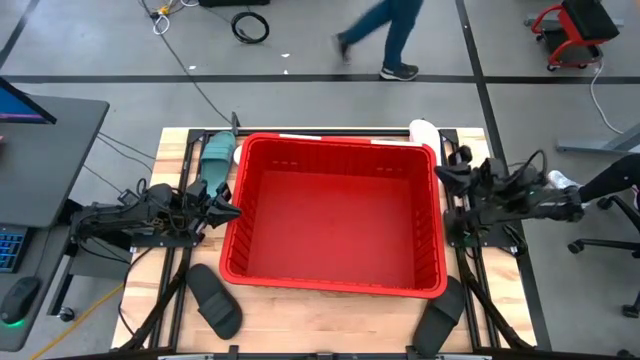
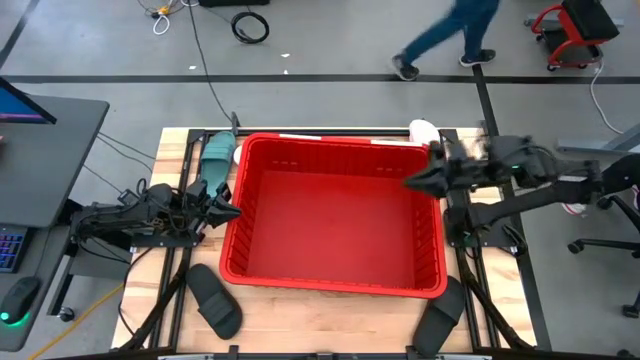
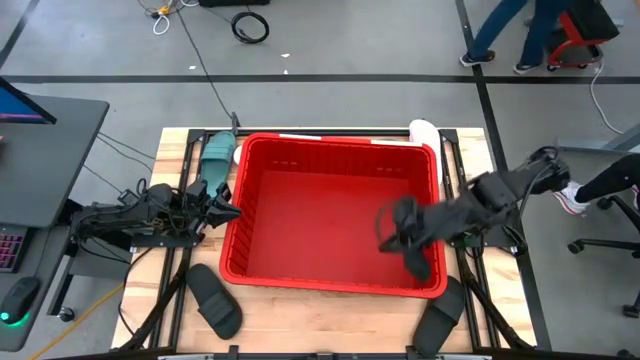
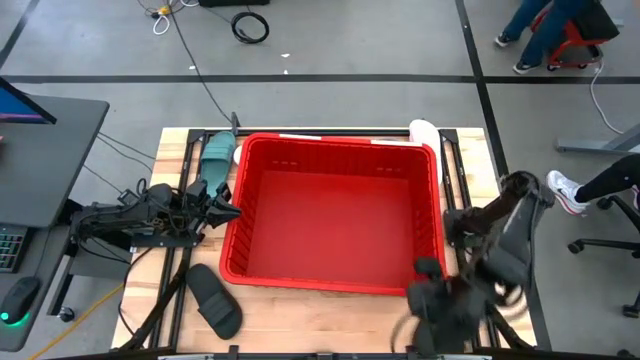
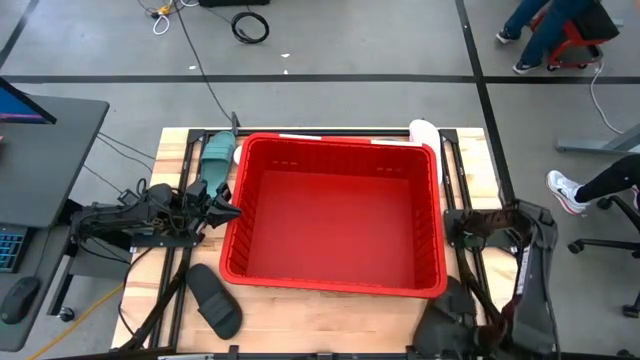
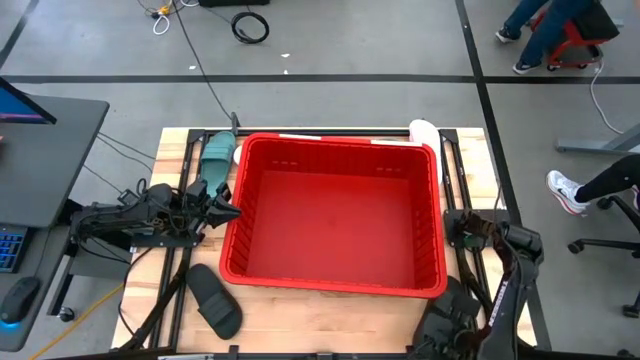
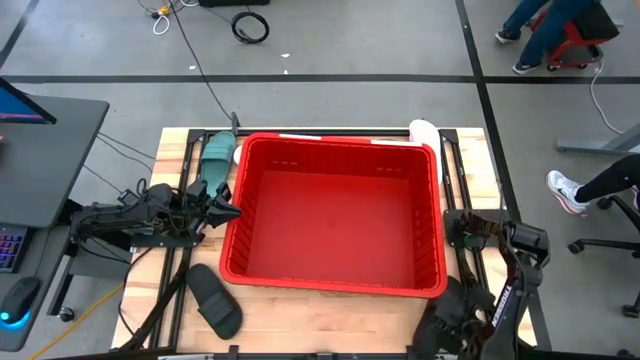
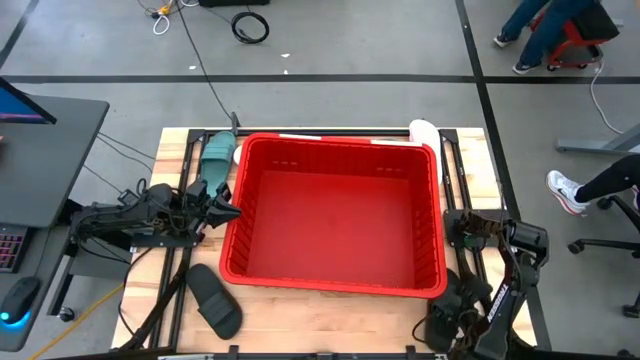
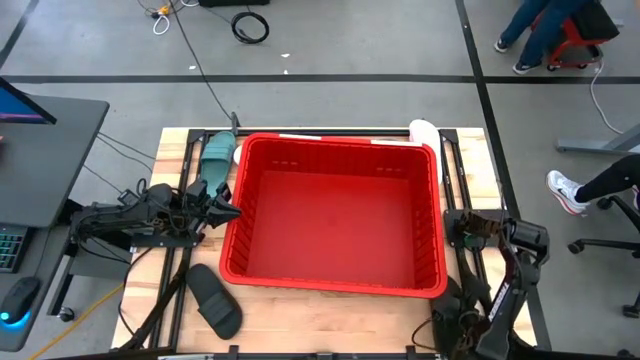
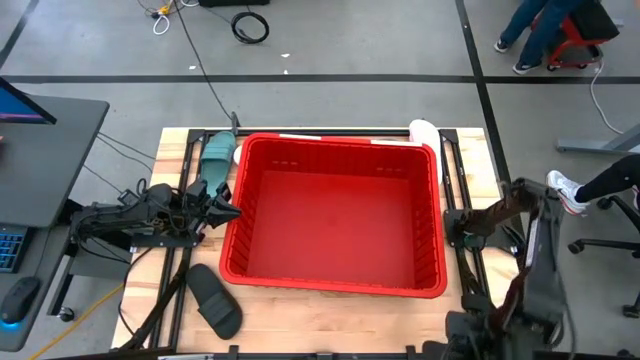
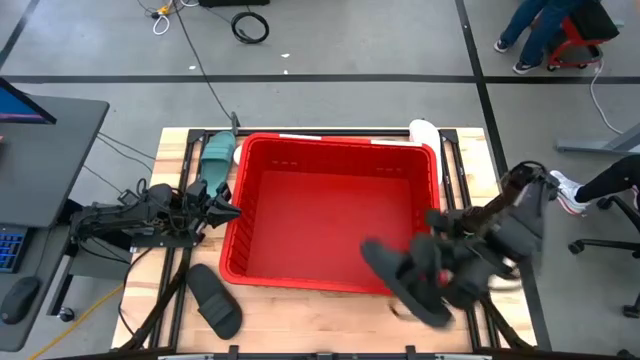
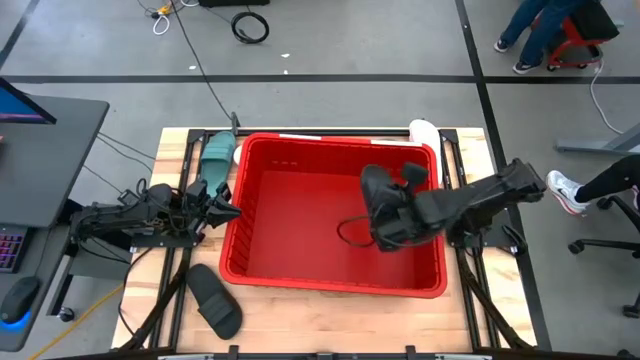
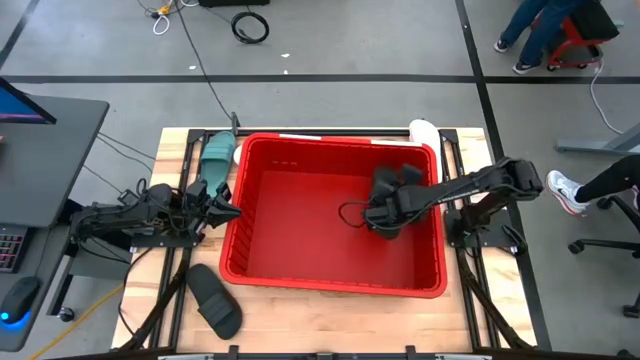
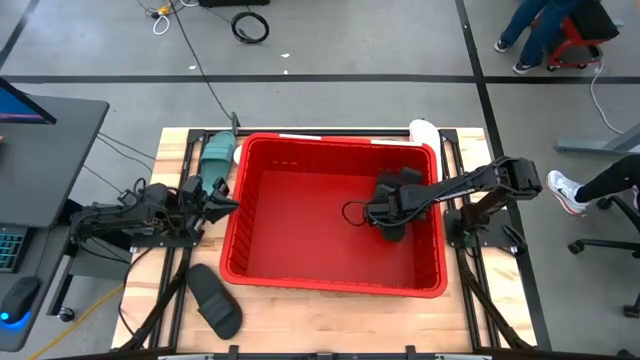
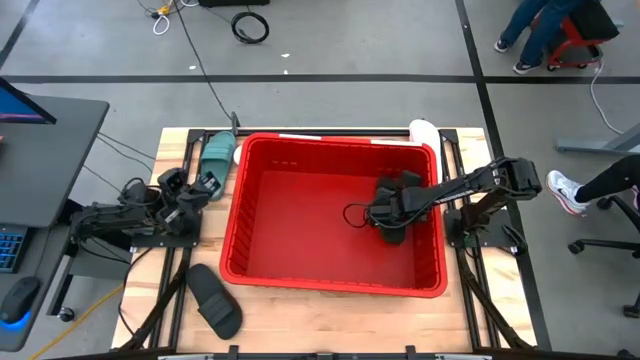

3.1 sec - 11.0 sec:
Task: Pick and place slides into bin
Put the right black slide into the red bin

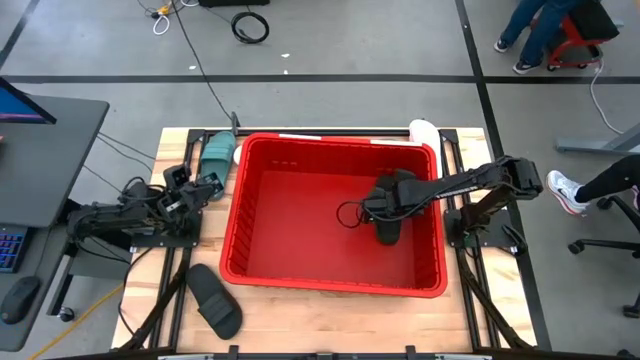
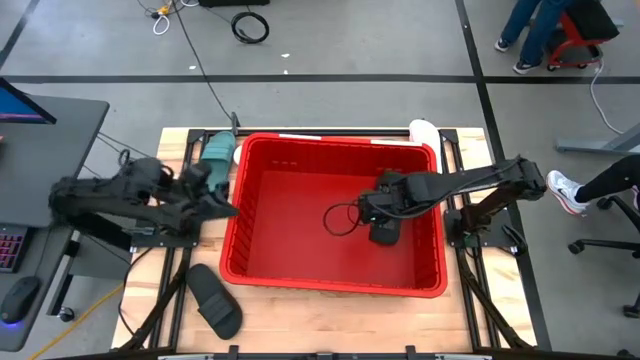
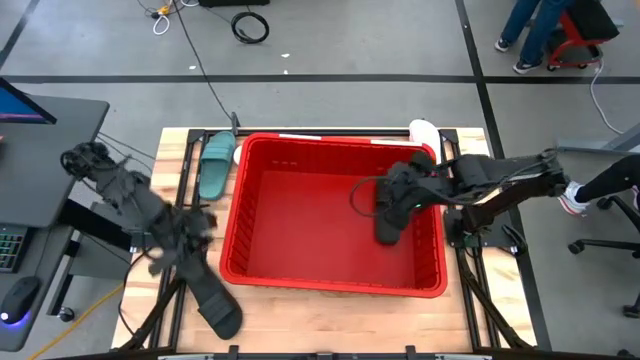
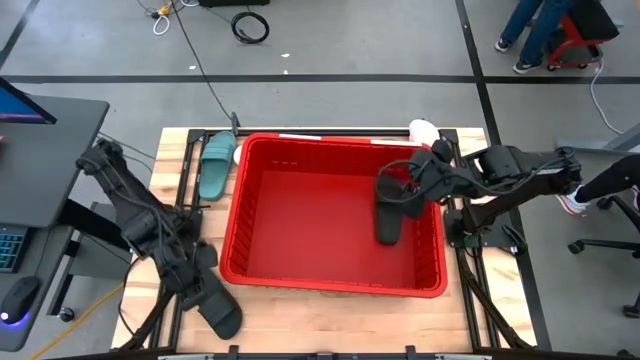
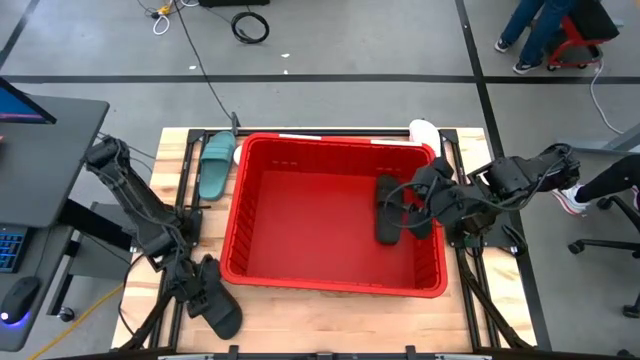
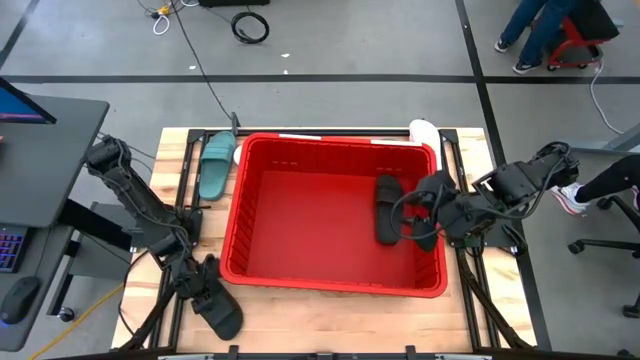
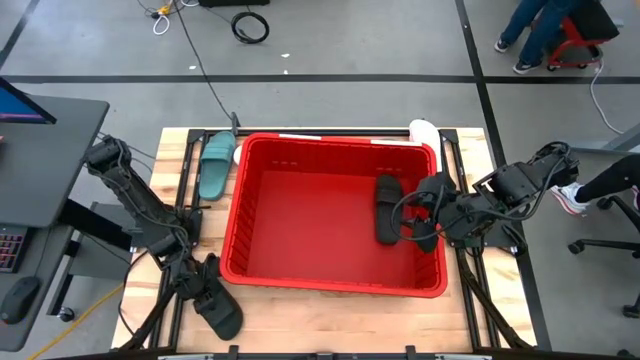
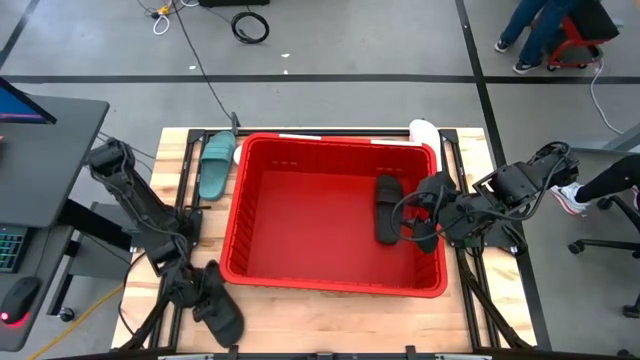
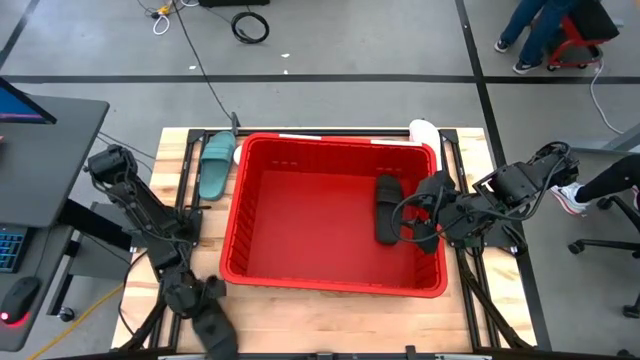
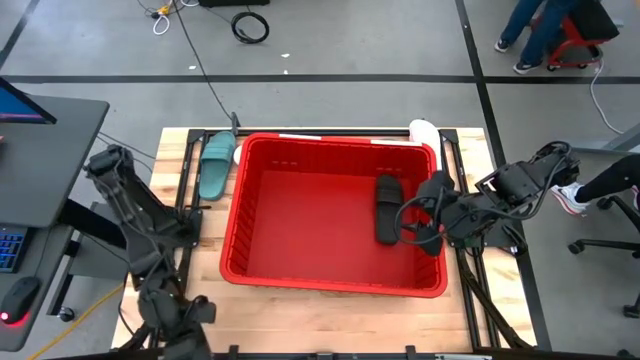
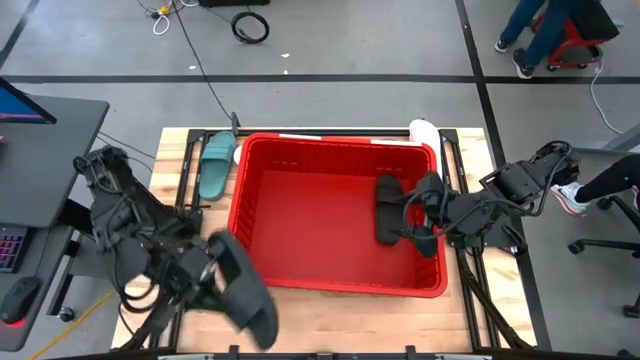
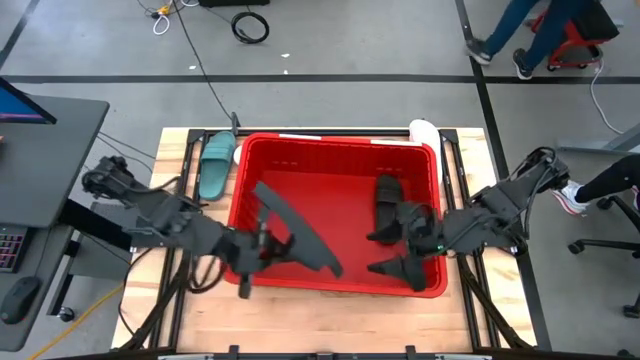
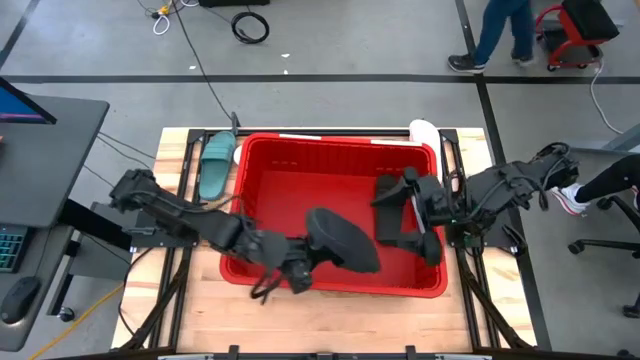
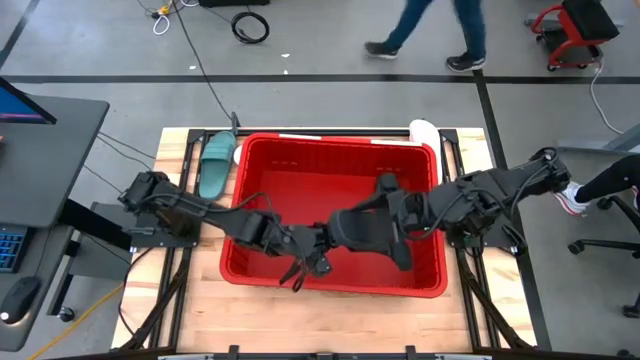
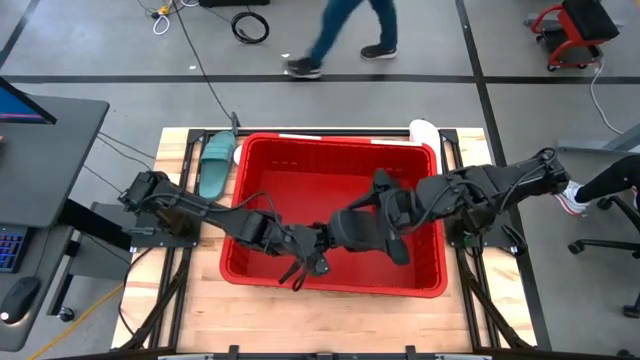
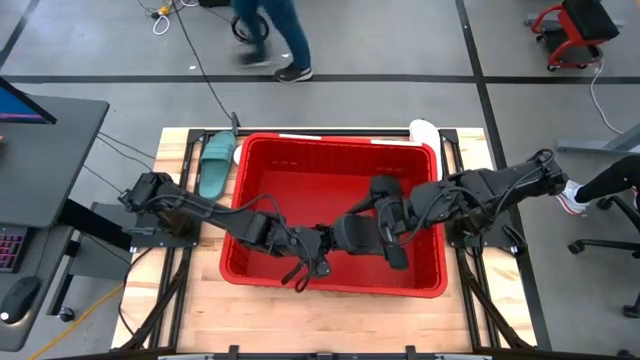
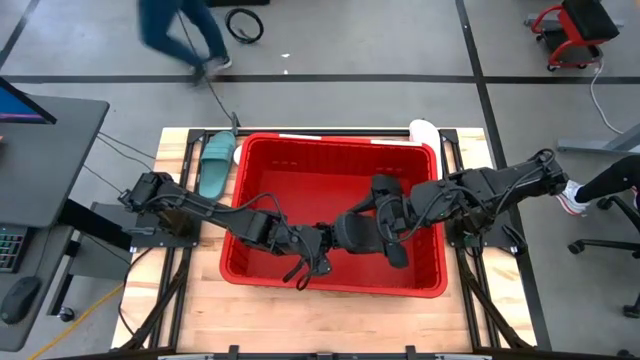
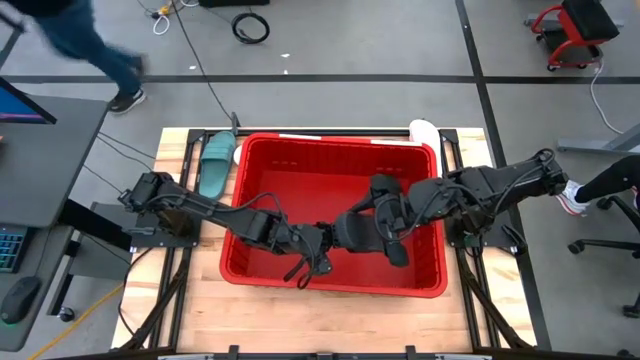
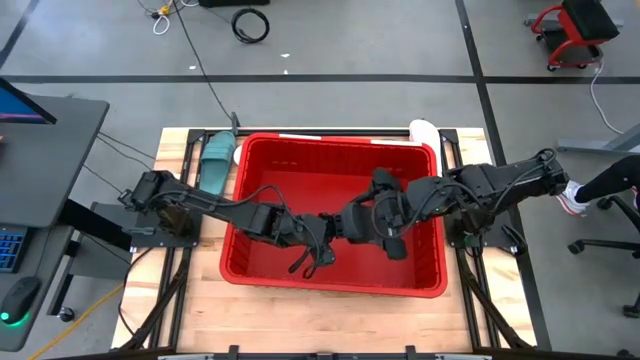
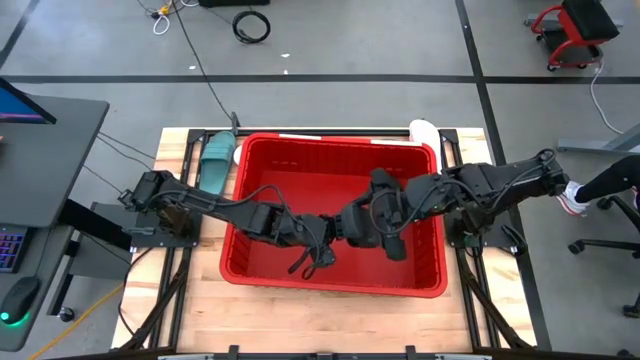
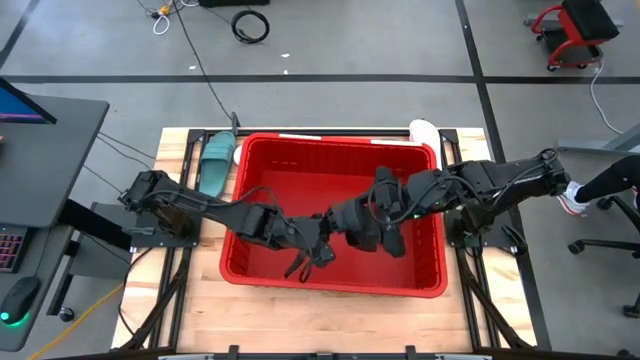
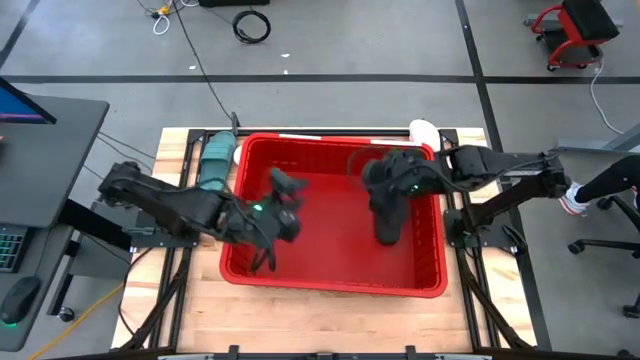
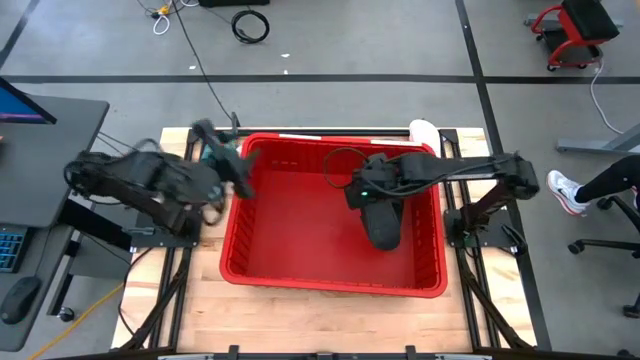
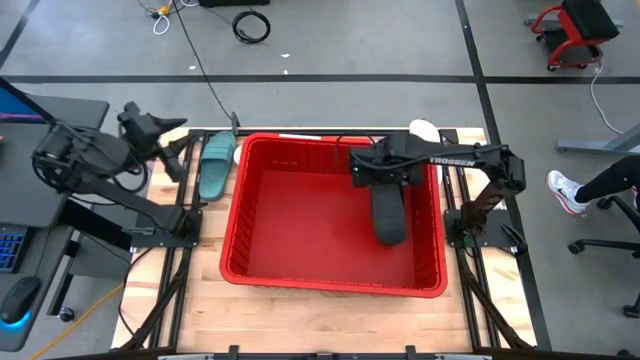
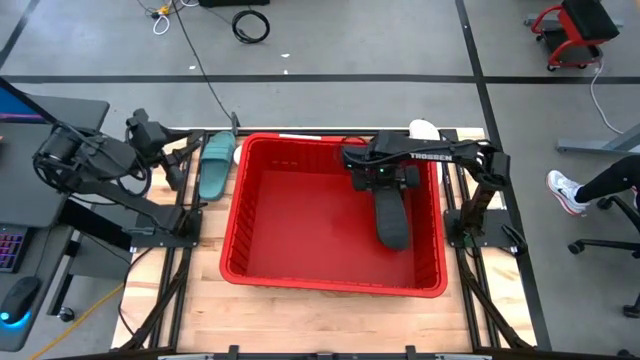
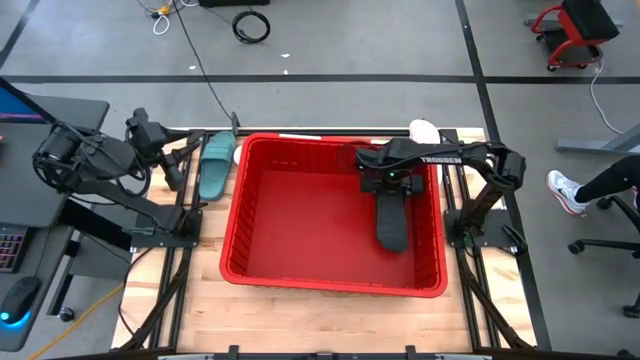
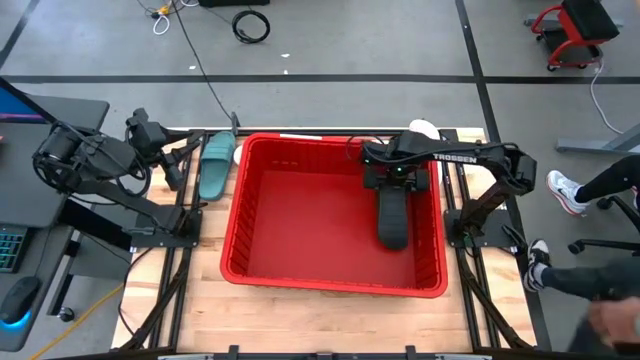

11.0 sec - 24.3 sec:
Stack the black slide on top of the black slide in the red bin
